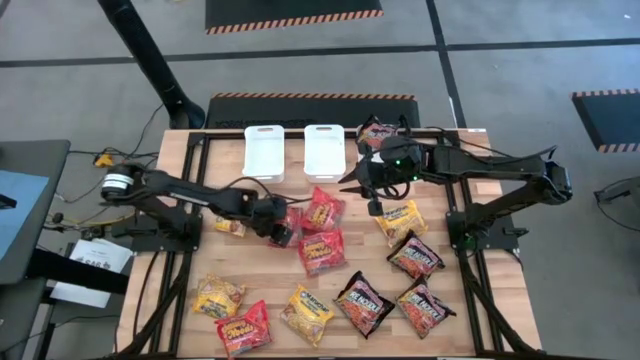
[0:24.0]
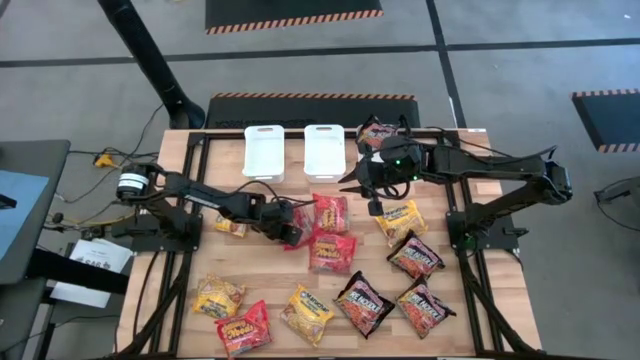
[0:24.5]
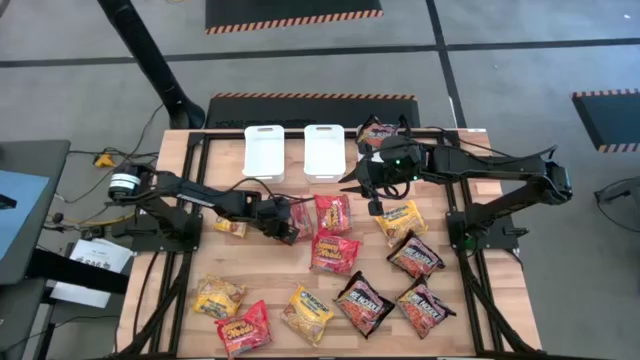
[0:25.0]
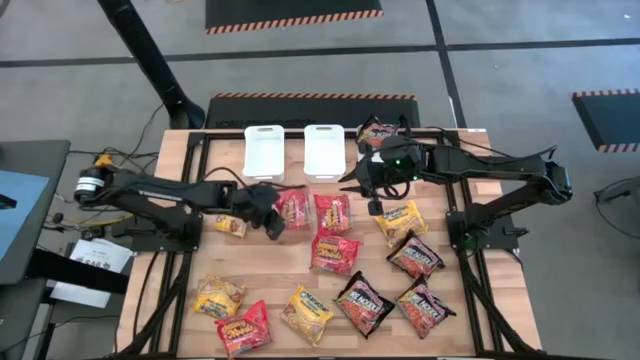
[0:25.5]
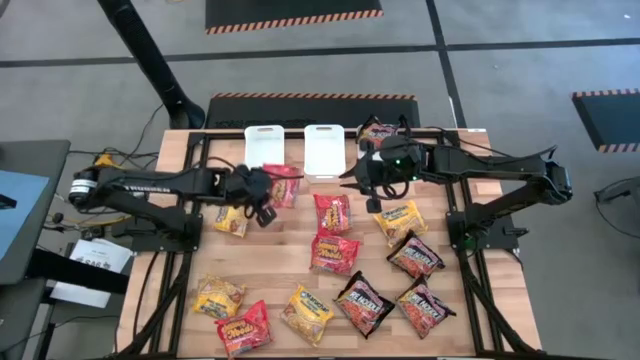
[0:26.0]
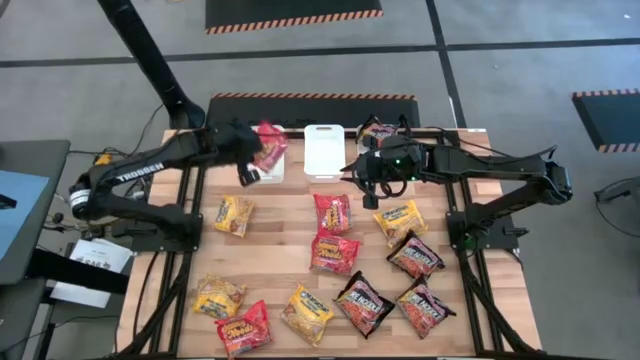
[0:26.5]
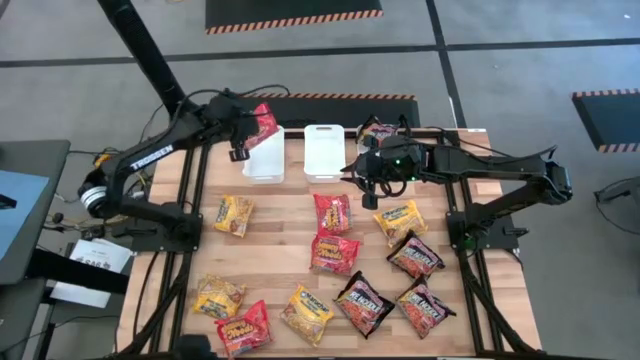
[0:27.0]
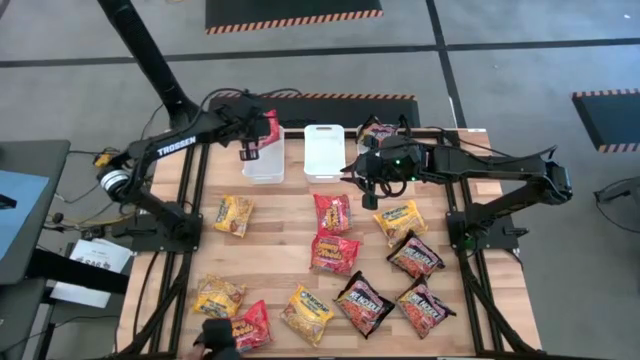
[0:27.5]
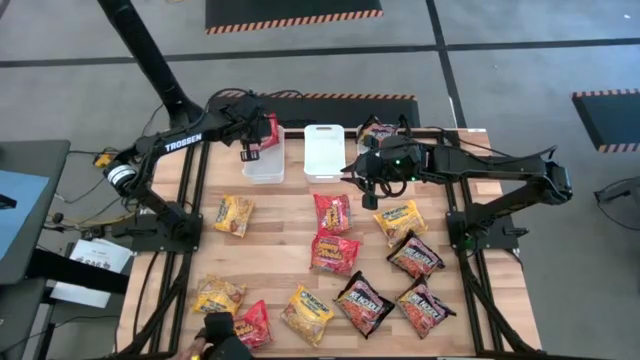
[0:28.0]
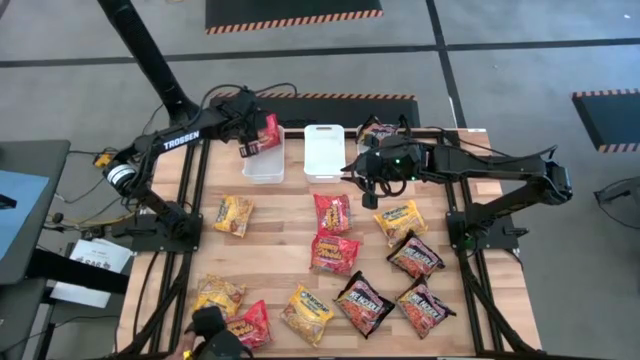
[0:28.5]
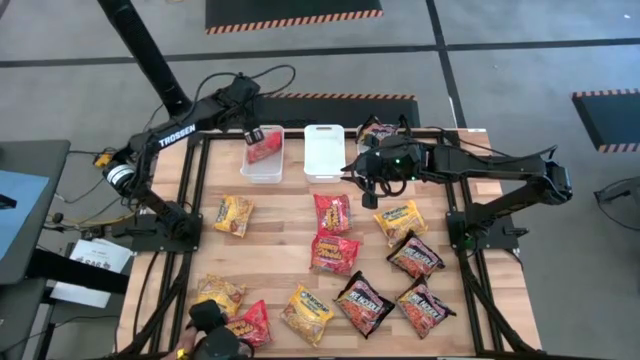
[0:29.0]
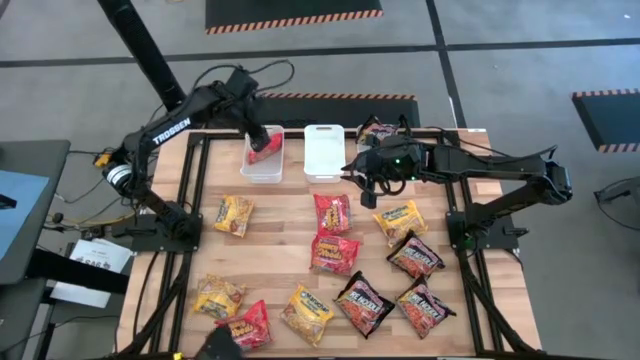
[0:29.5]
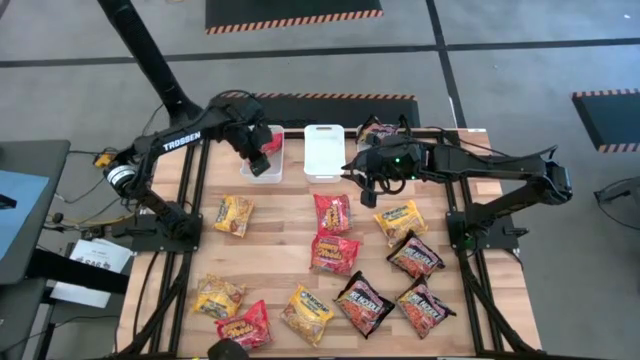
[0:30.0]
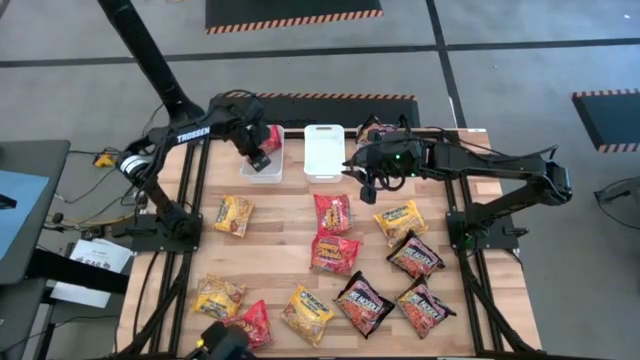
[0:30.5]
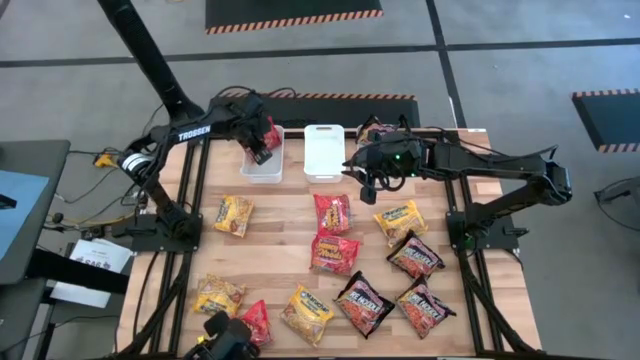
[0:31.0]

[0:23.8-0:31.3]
Task: Sort Maruchan noodles
Put the orange noodle pack into the left white bin

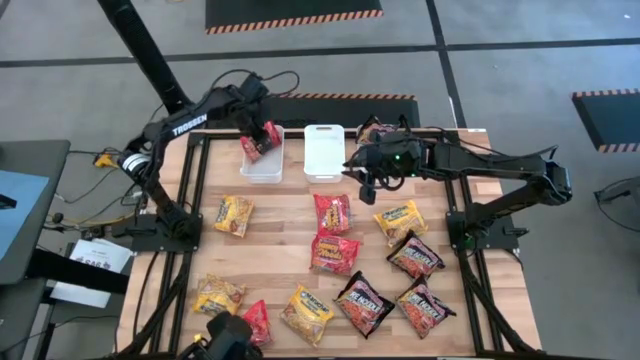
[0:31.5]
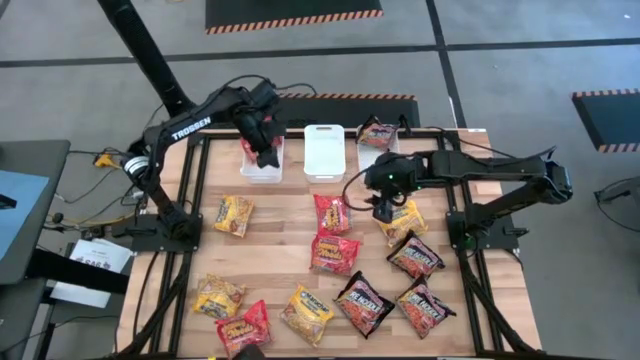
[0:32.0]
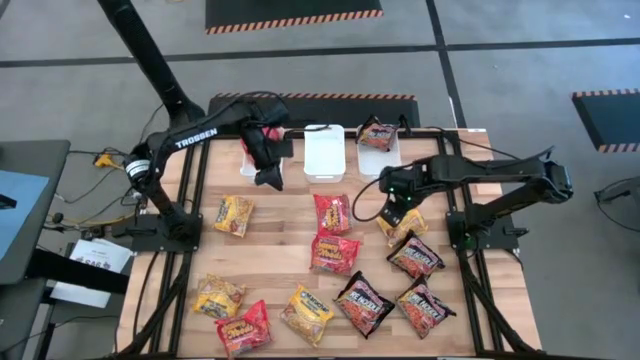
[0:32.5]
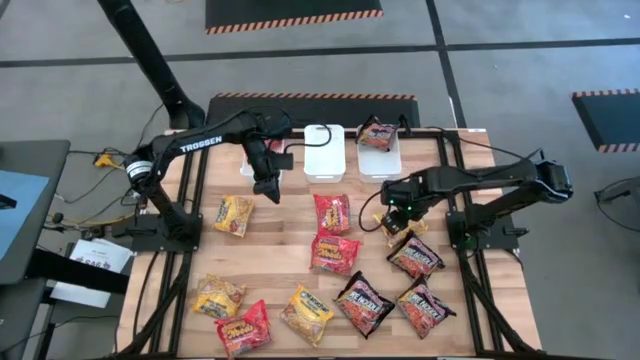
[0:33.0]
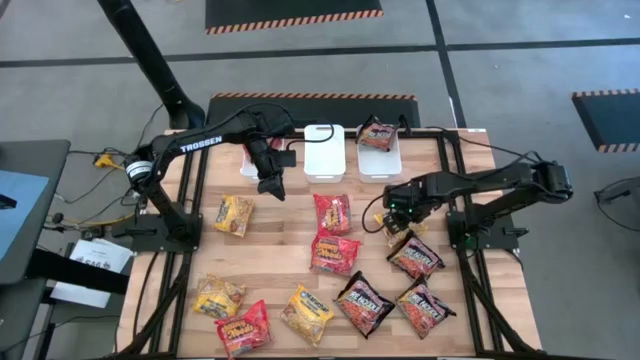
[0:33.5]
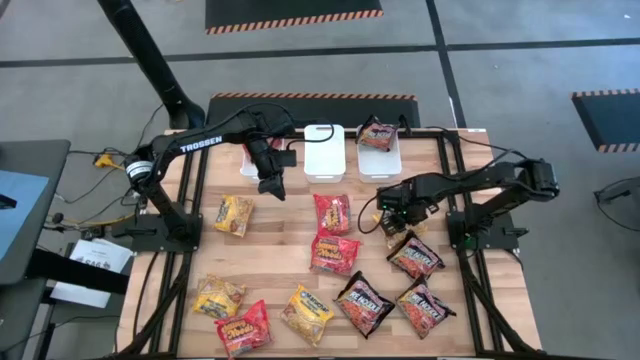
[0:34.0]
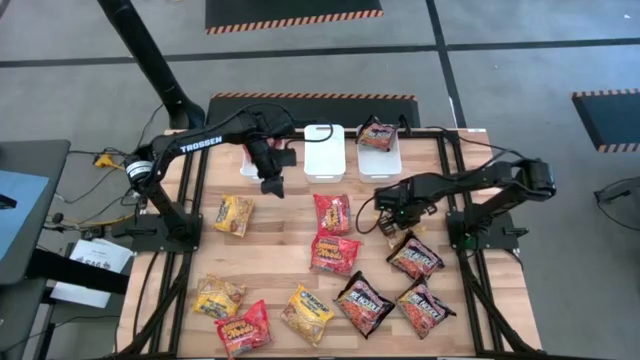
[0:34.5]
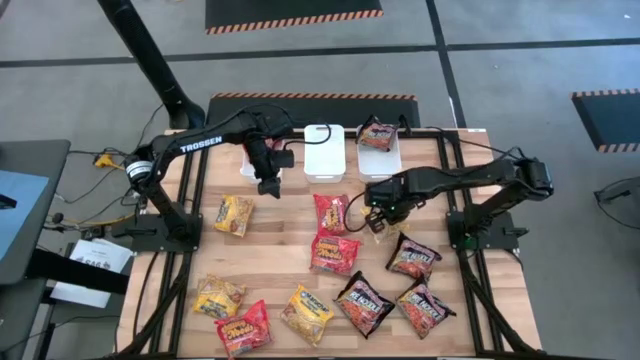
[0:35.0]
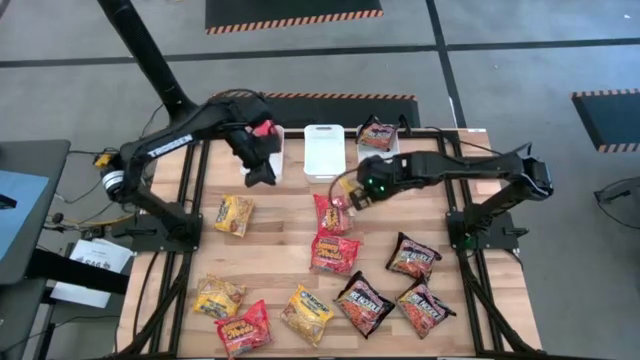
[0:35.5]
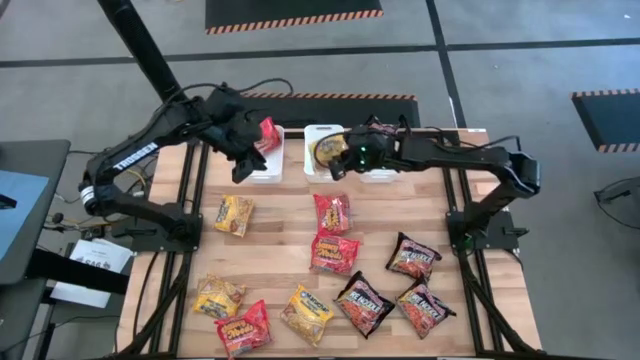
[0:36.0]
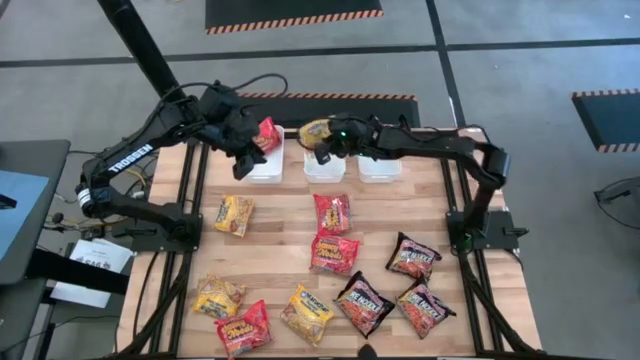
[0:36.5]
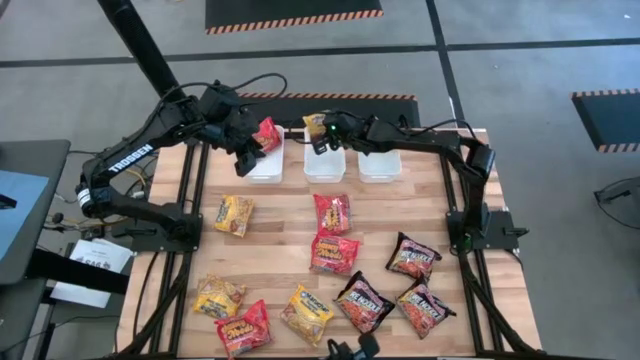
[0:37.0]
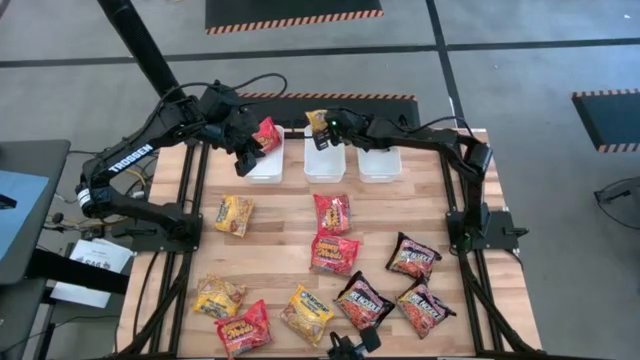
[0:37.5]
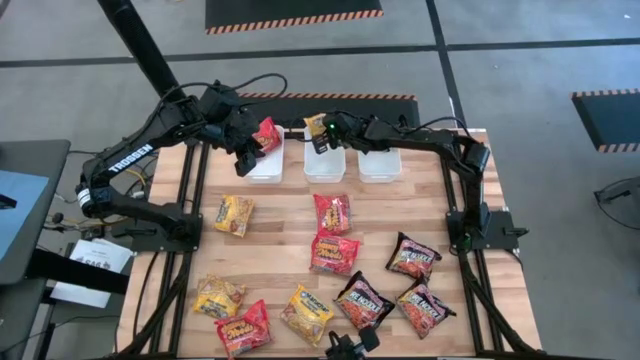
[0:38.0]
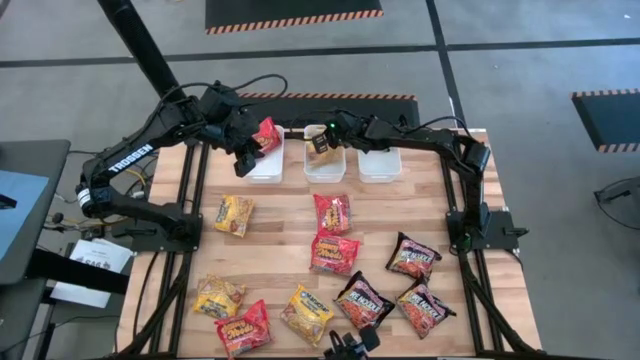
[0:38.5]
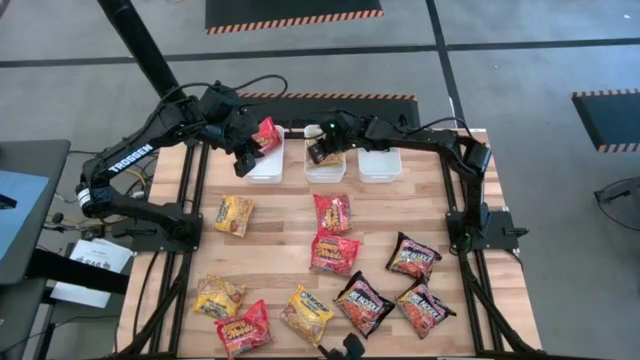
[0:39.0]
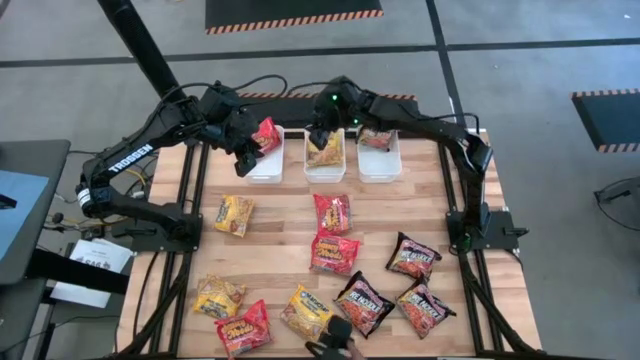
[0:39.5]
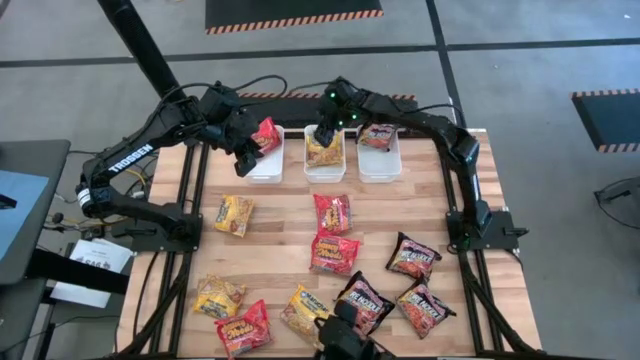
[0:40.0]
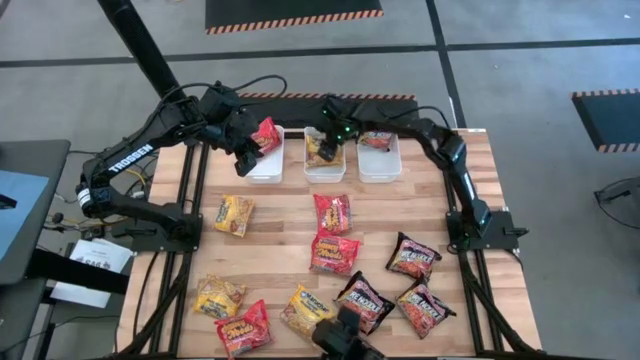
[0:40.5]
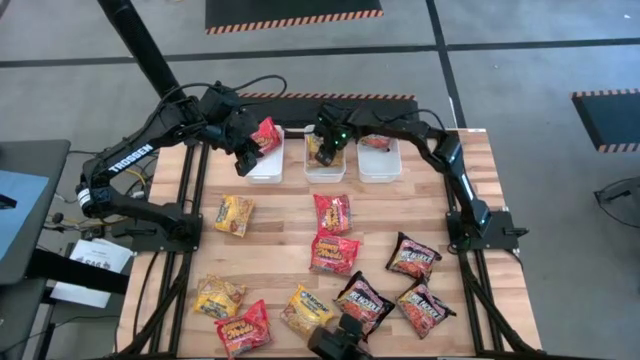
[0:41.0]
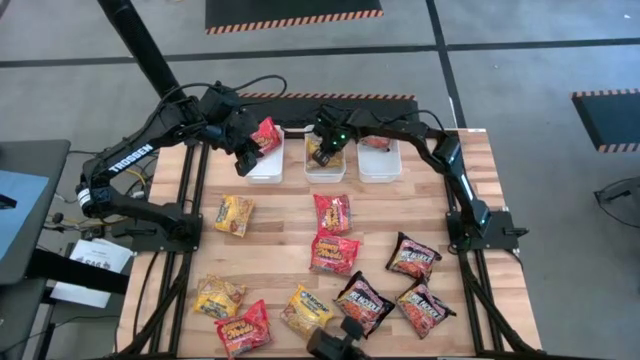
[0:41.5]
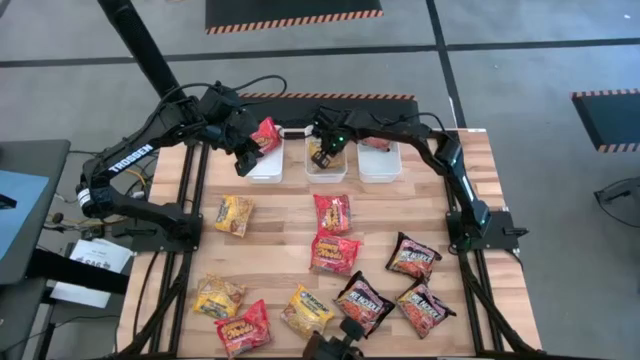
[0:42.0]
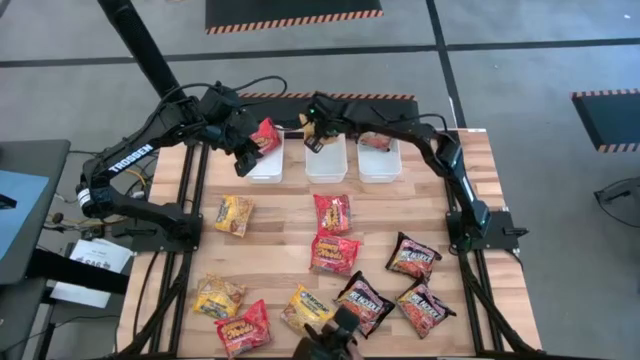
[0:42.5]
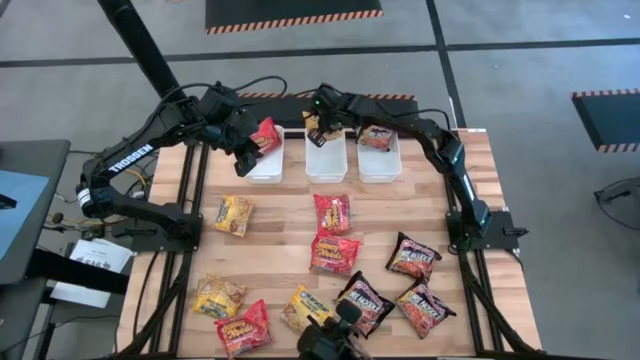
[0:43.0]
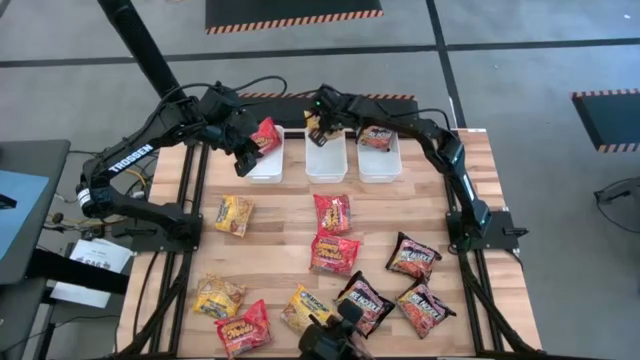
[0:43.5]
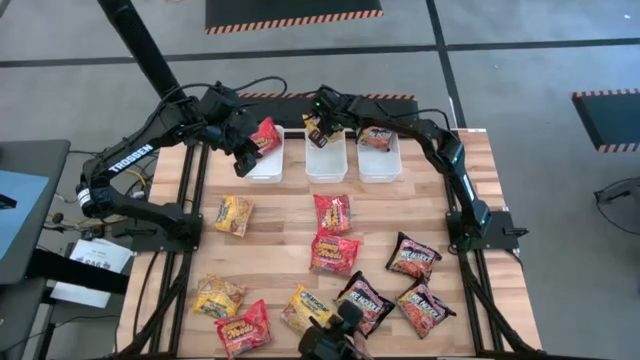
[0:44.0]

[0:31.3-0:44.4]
Put the yellow noodle pack into the middle white bin

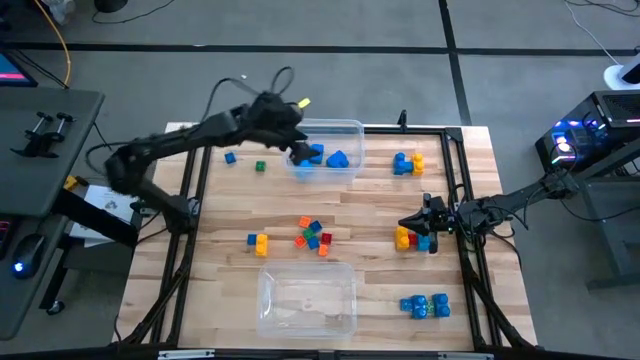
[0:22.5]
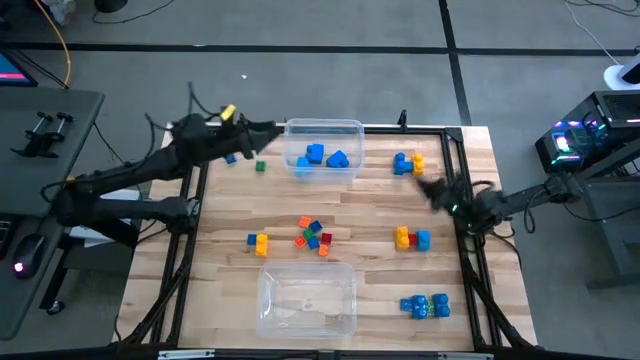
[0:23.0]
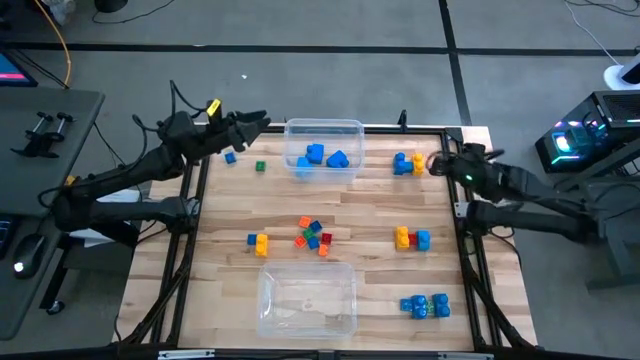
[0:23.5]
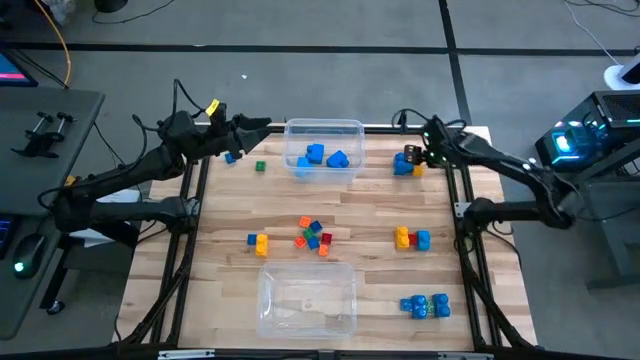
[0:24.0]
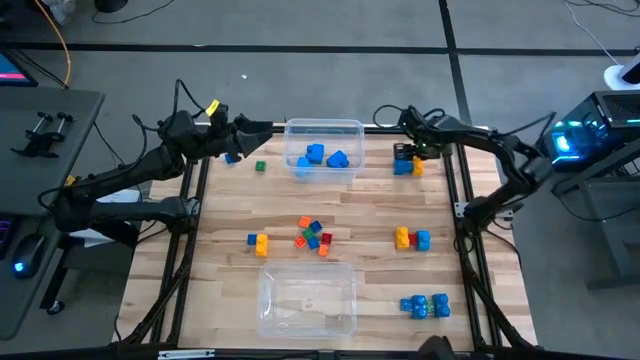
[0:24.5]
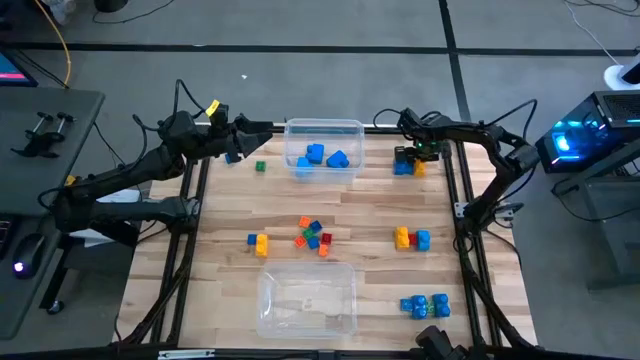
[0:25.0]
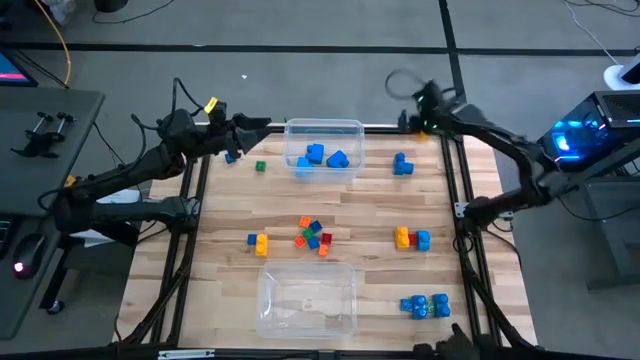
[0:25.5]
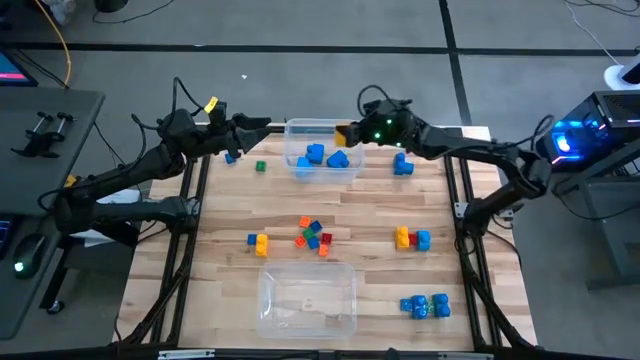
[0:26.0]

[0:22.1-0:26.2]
Task: Sort blocks by size
Put the large yellow game piece into the top transparent bin
